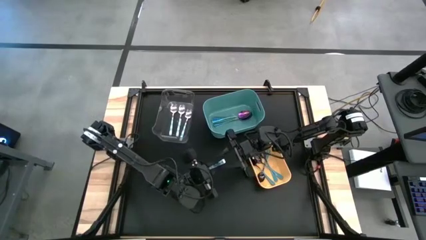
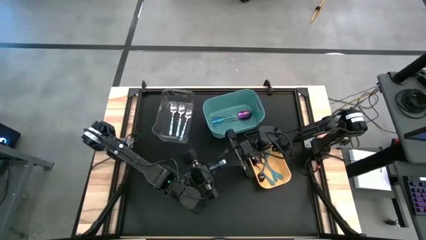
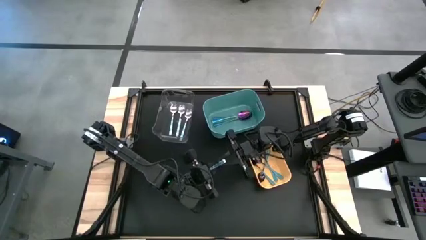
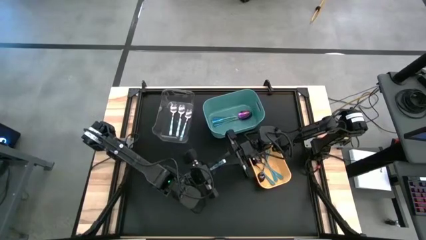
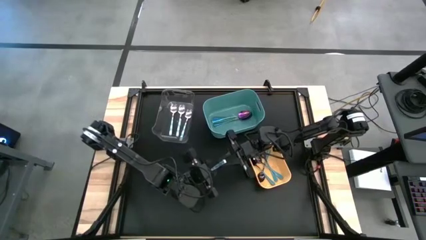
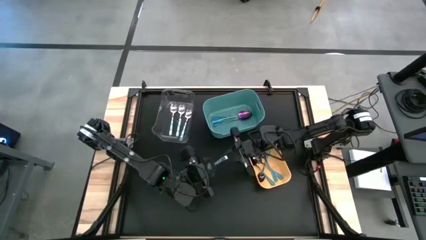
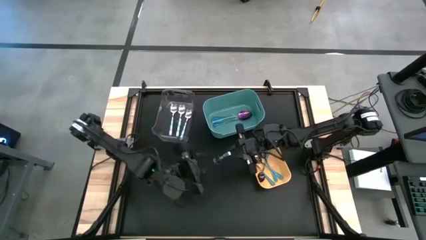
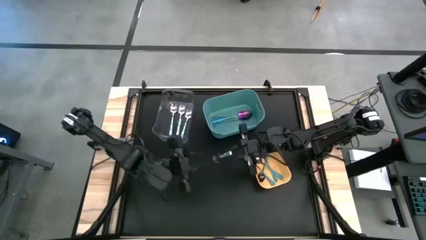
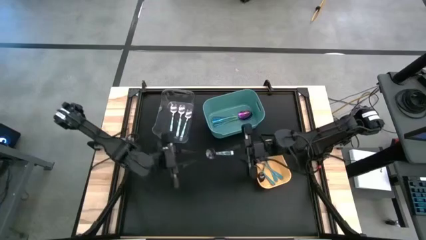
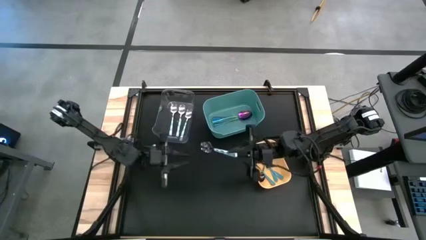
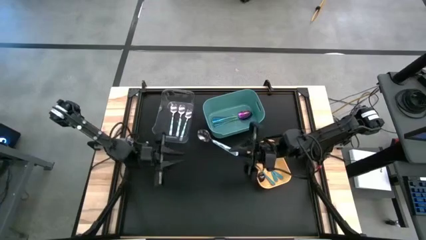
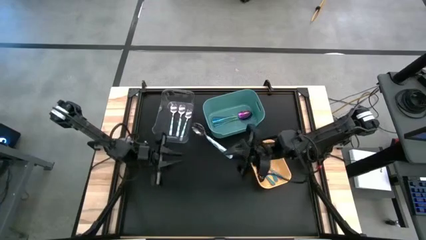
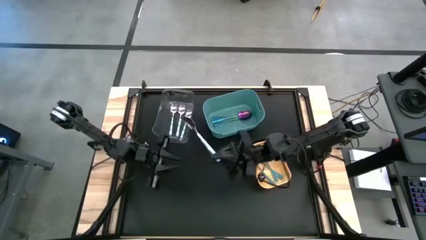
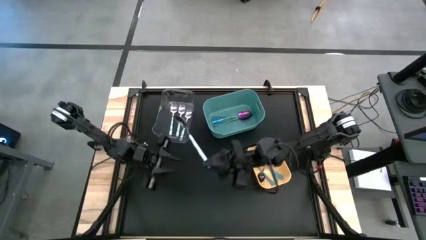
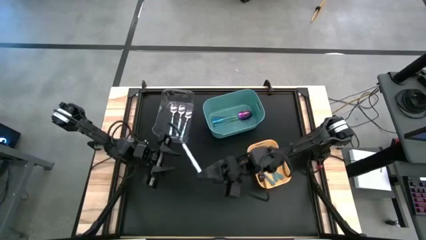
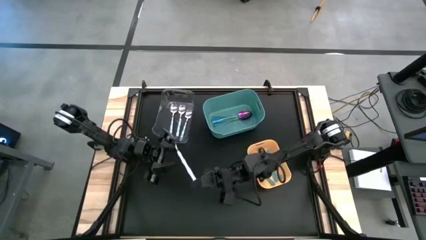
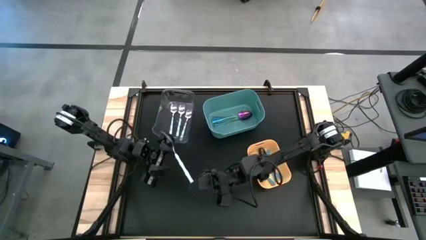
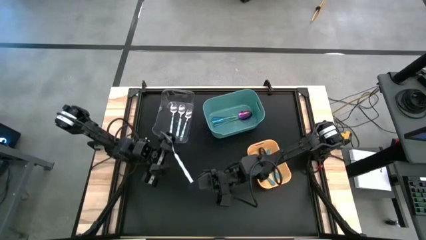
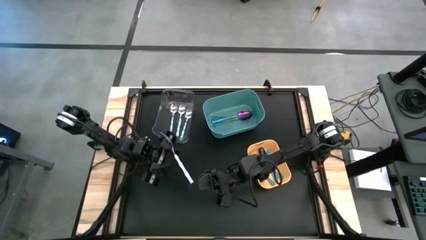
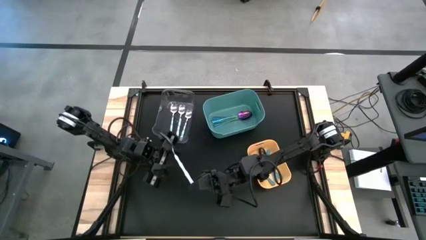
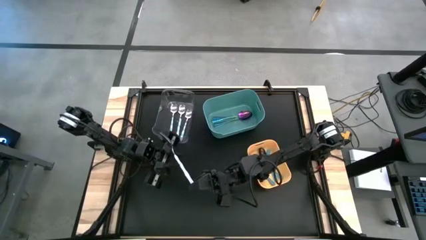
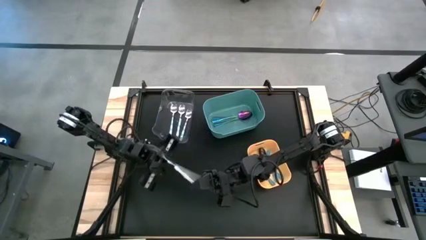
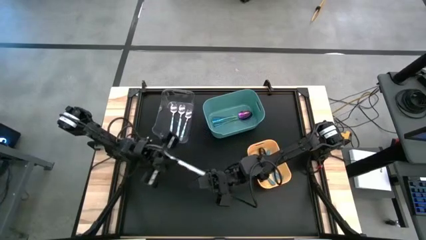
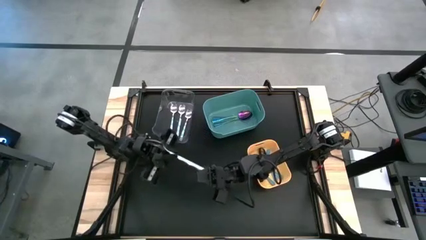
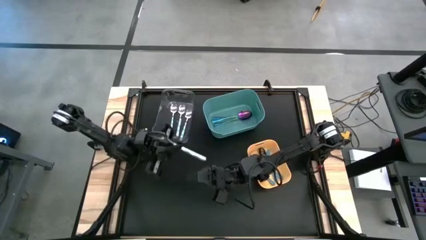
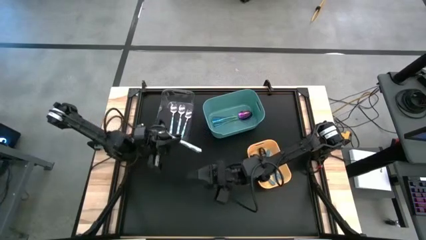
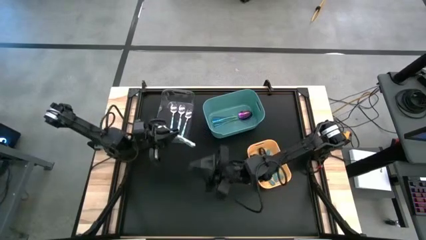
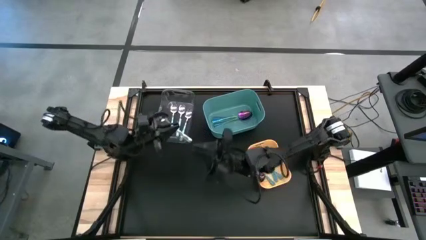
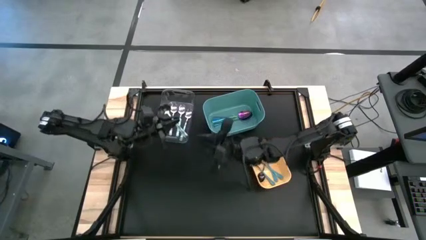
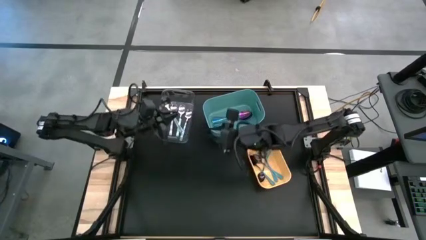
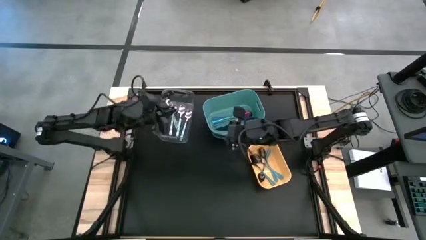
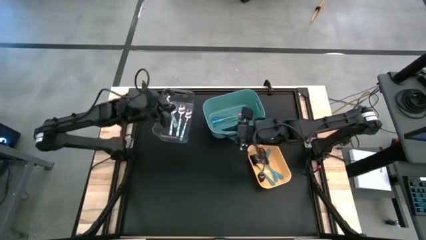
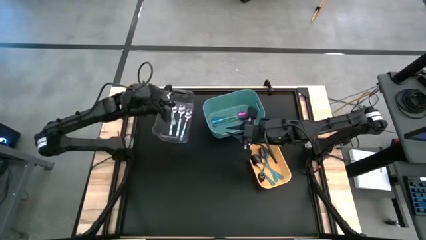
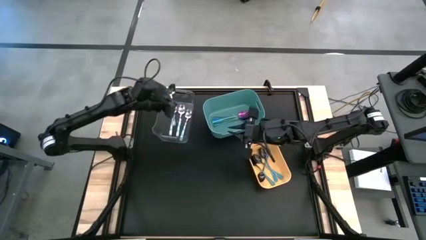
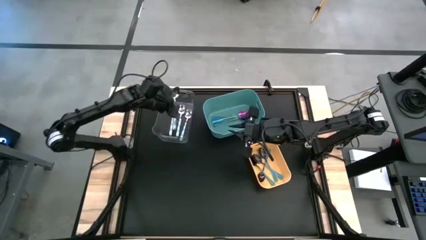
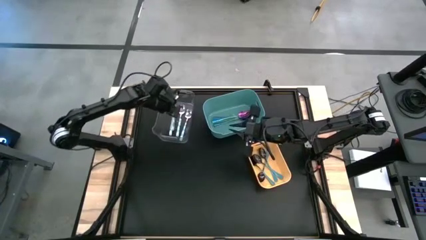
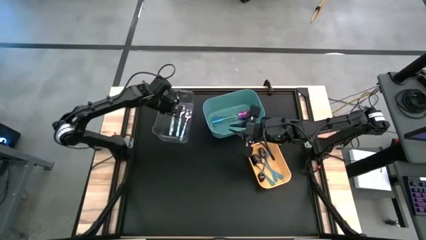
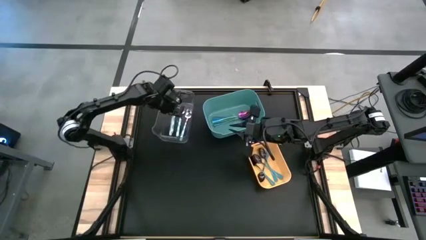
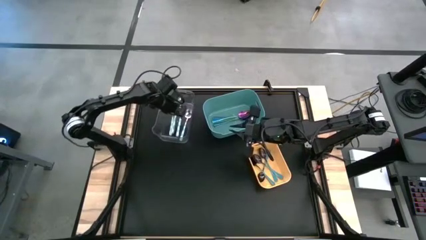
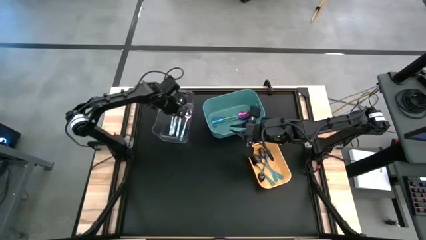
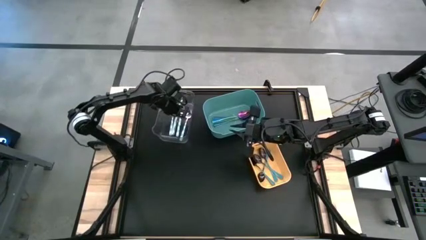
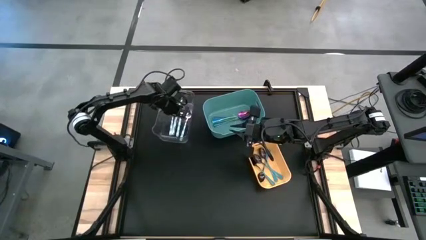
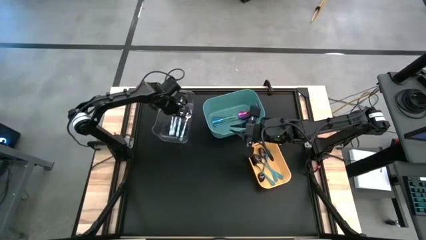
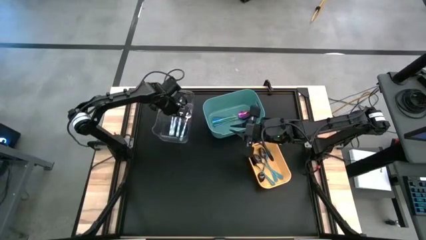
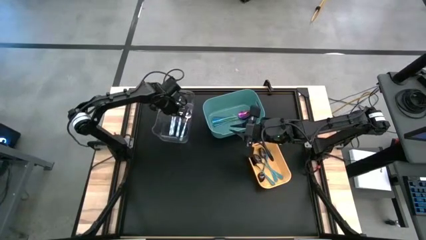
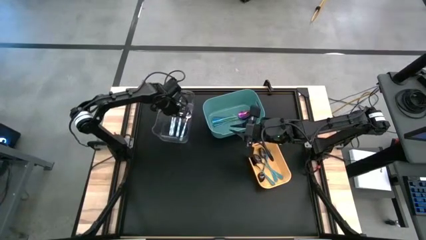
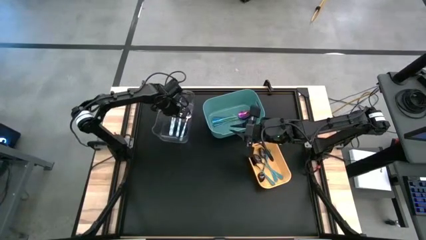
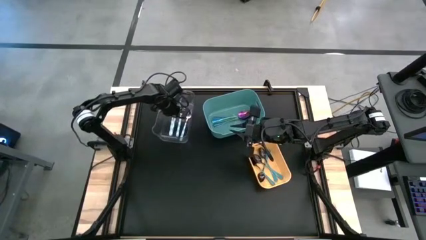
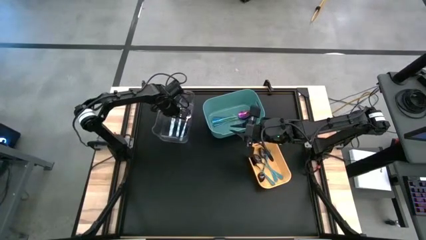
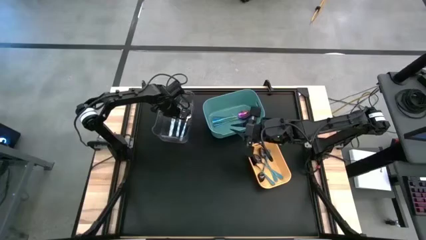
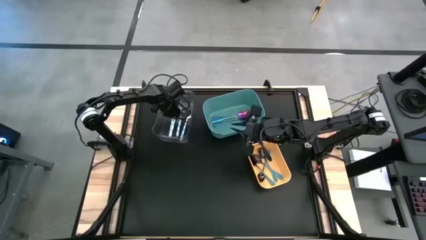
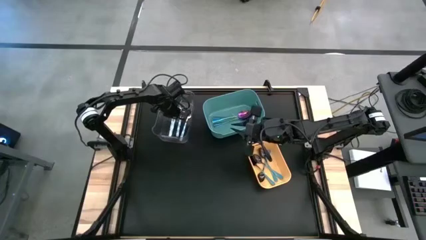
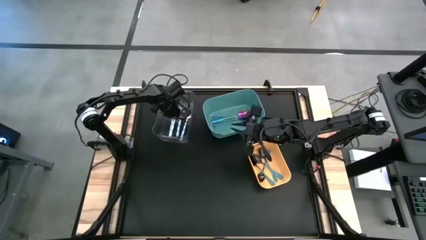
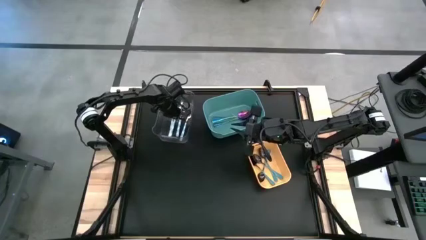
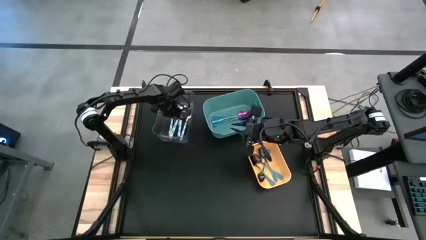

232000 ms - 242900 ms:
Task: Sort silverware by color (type)
Put the patterned blue spoon into the transparent bin

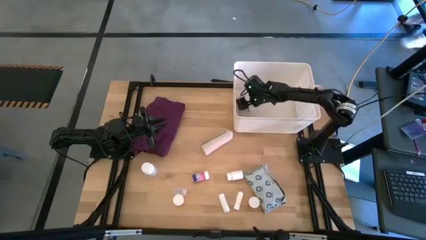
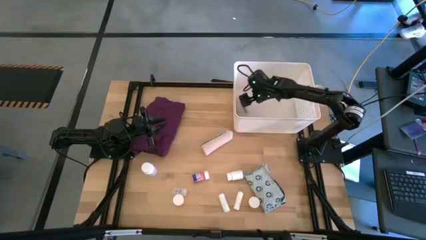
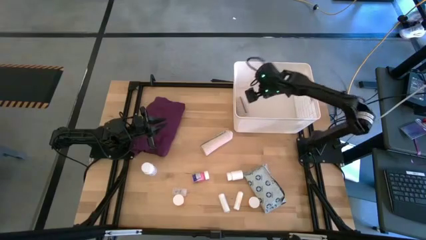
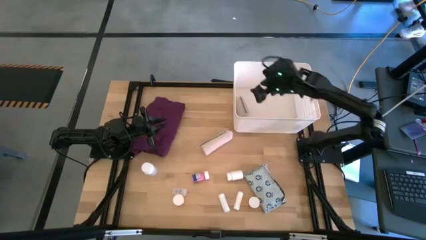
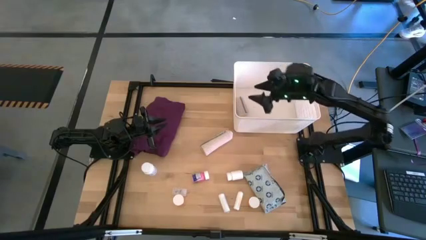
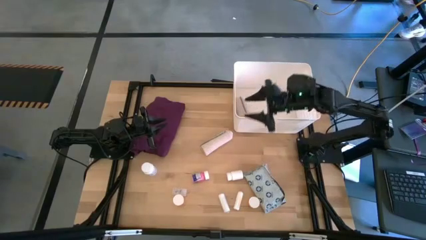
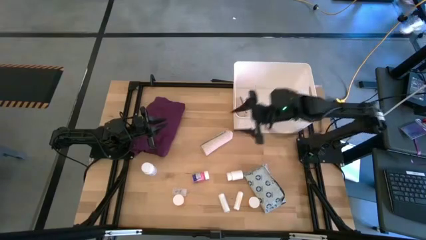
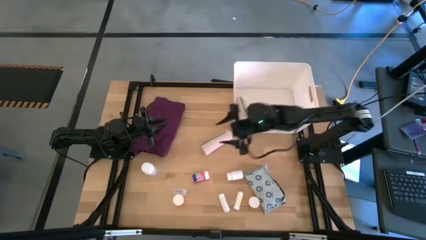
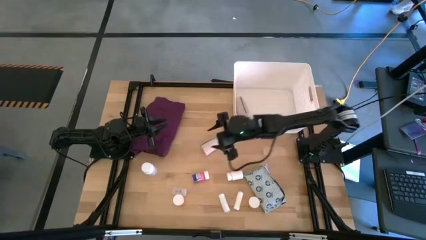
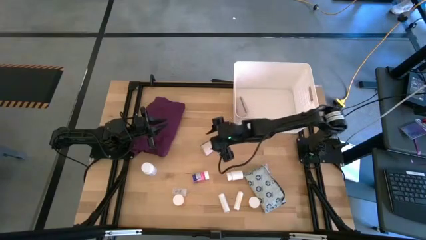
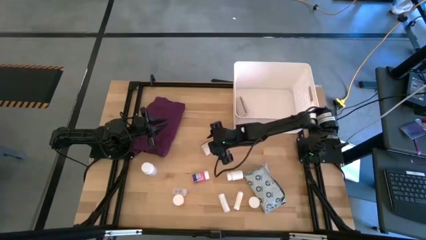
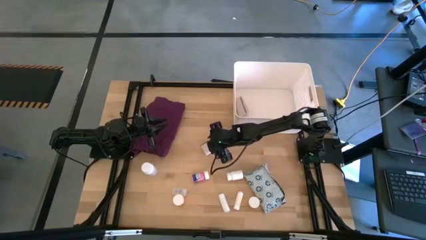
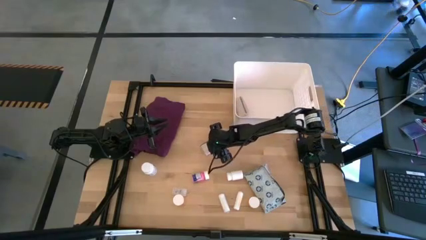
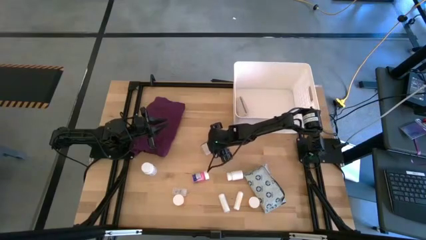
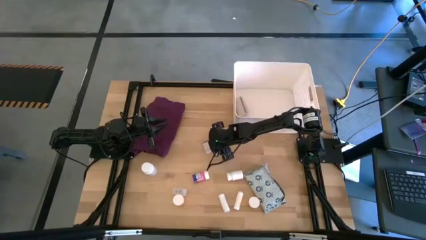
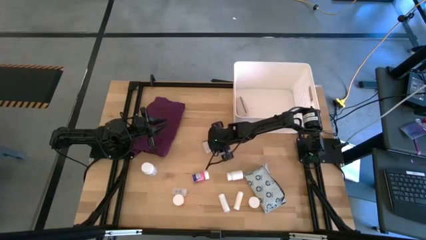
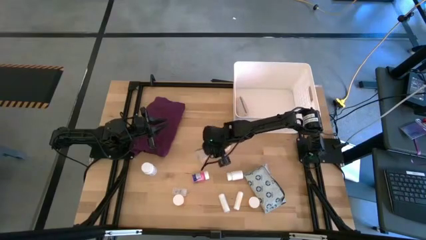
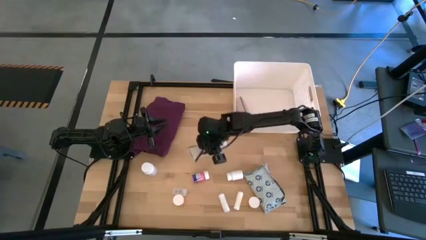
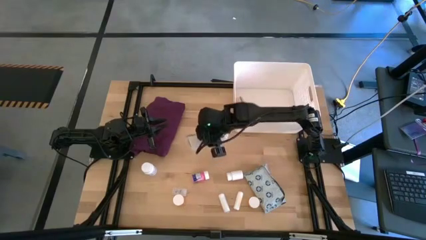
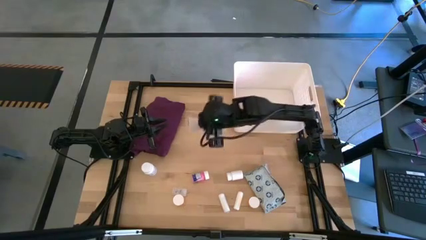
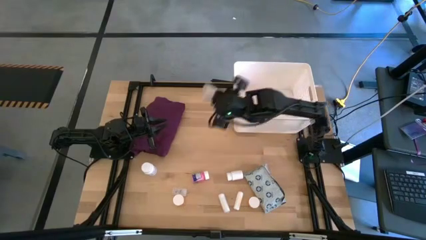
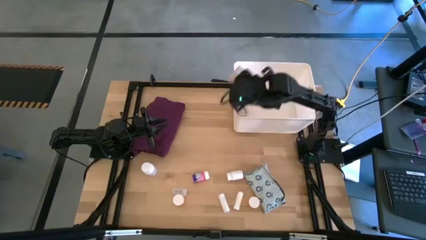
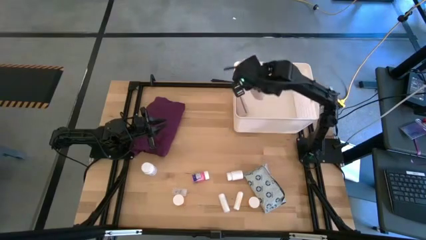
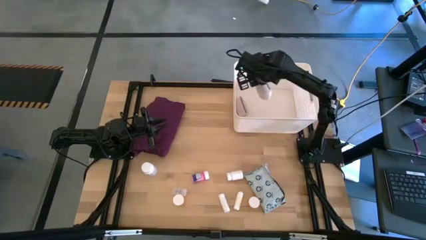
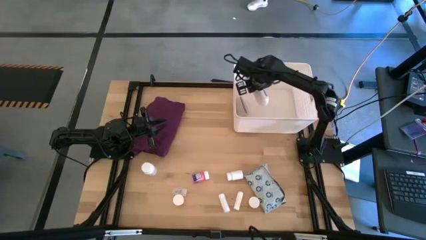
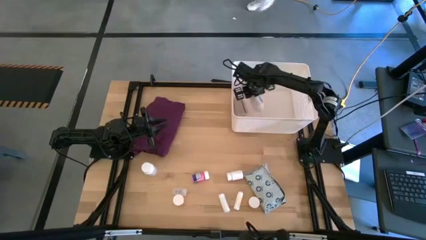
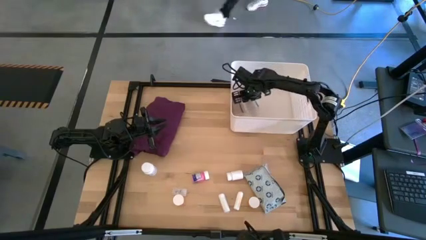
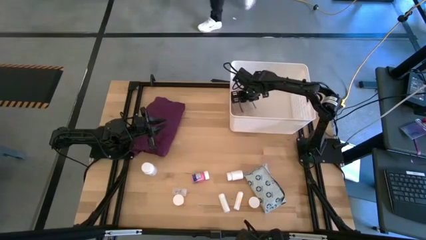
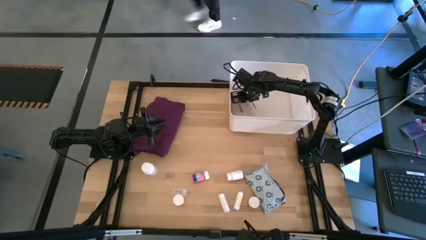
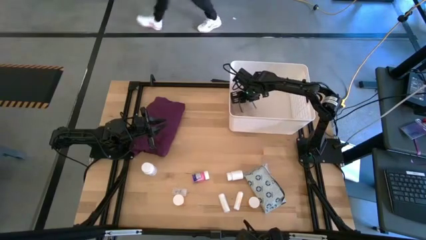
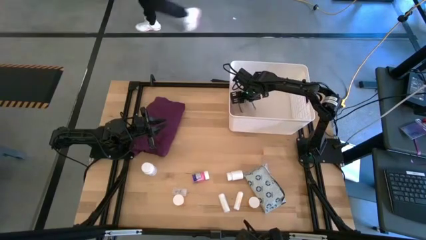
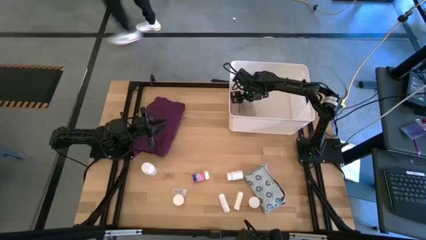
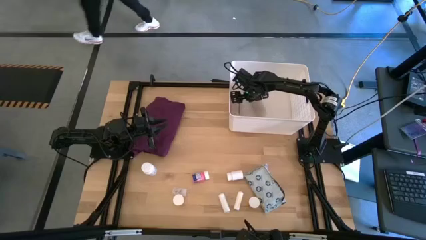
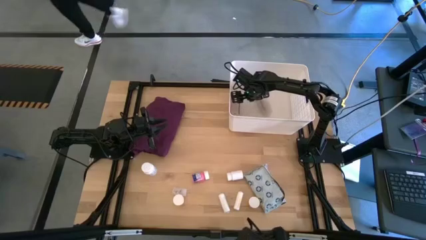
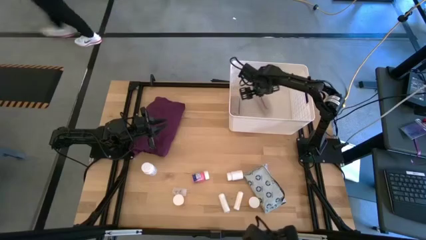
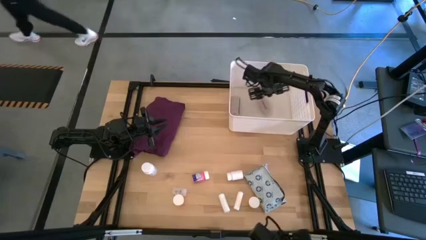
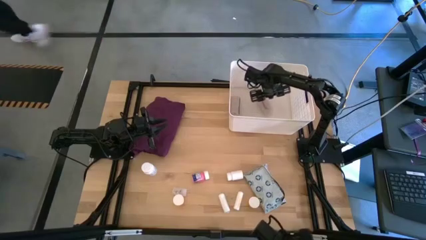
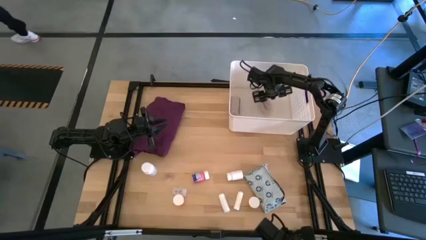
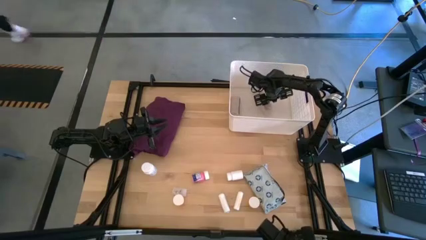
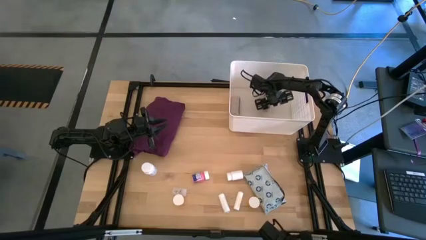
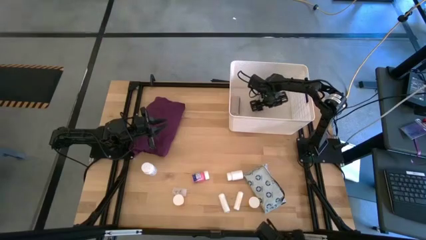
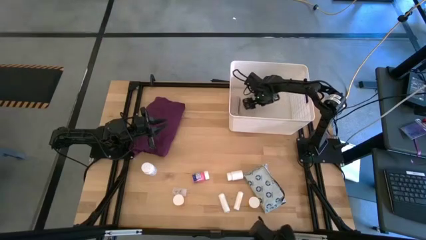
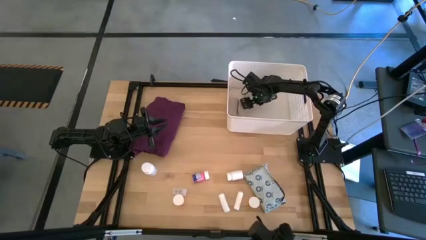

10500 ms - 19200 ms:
Task: Pick & place medical supplies in basket/bin
Put the white bandage into the white bin
